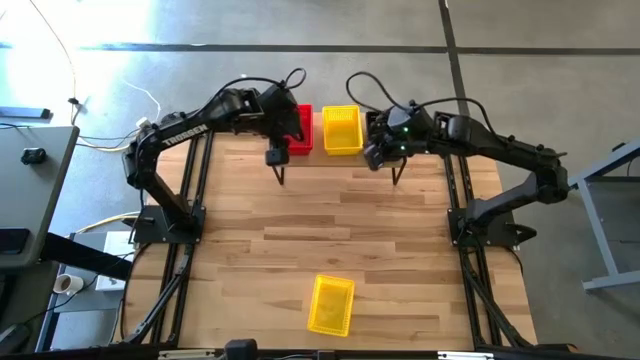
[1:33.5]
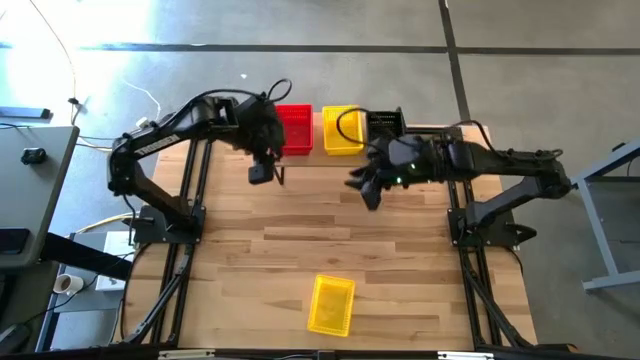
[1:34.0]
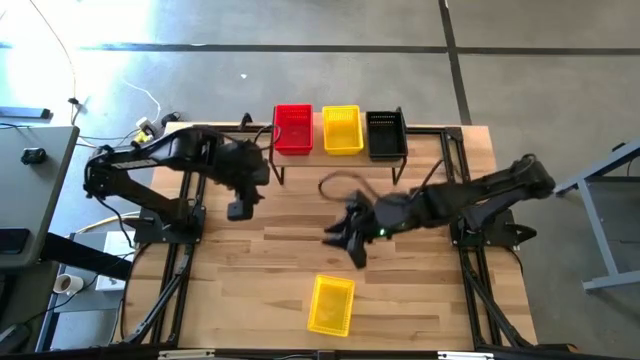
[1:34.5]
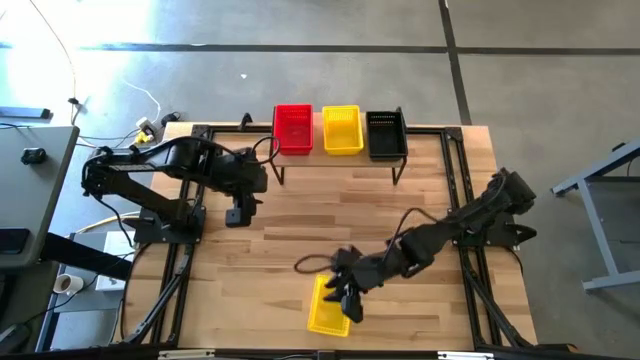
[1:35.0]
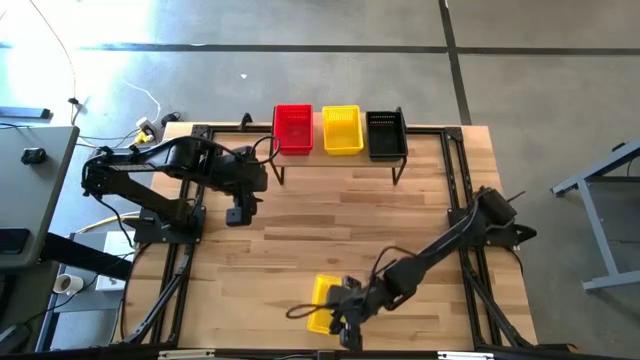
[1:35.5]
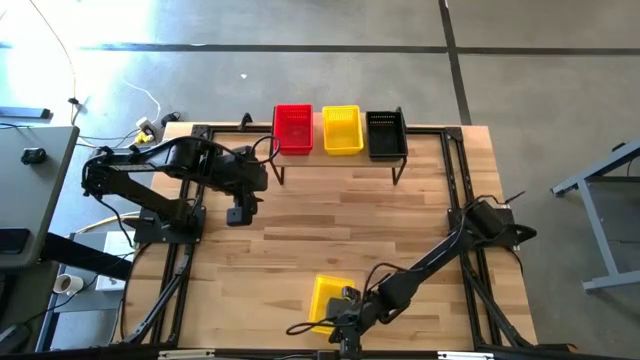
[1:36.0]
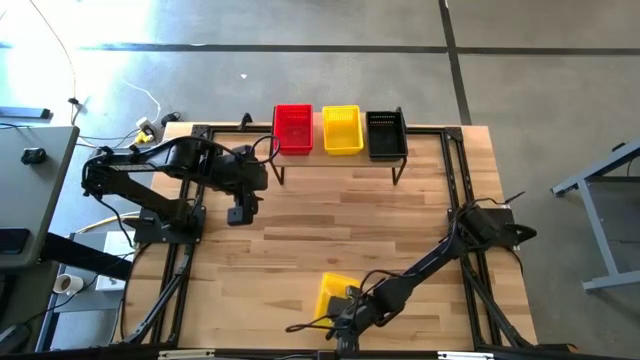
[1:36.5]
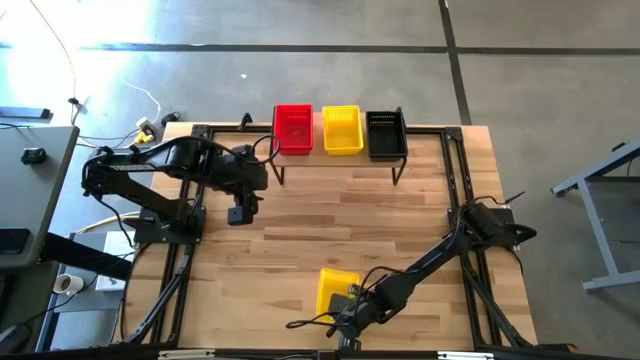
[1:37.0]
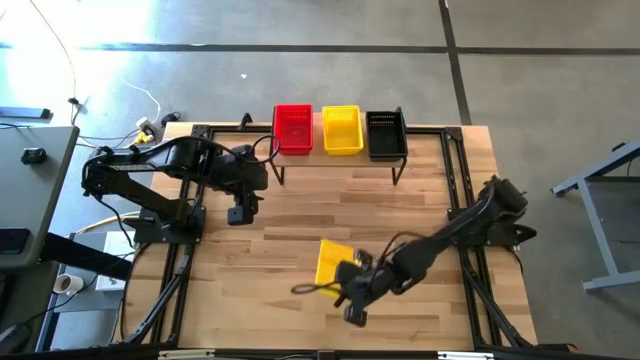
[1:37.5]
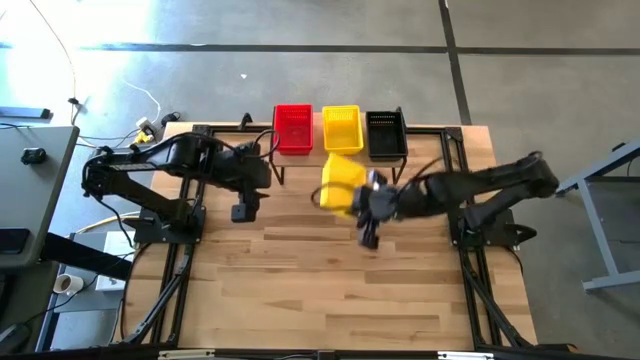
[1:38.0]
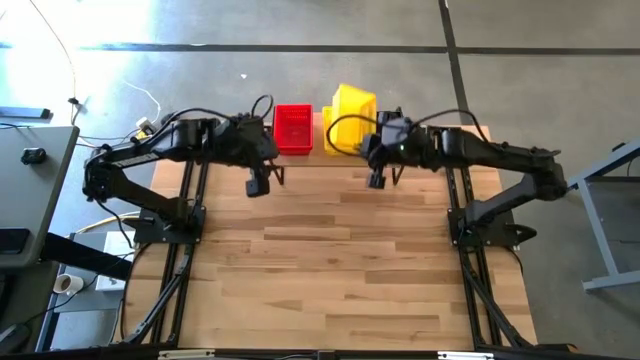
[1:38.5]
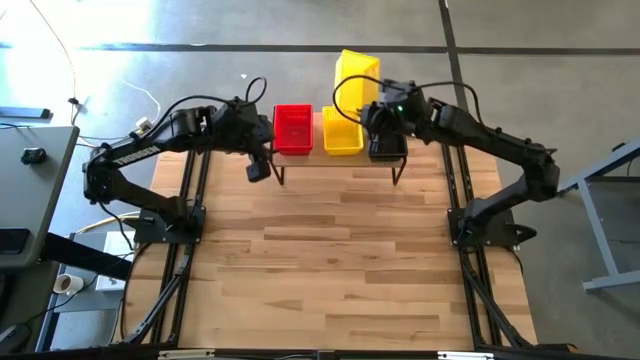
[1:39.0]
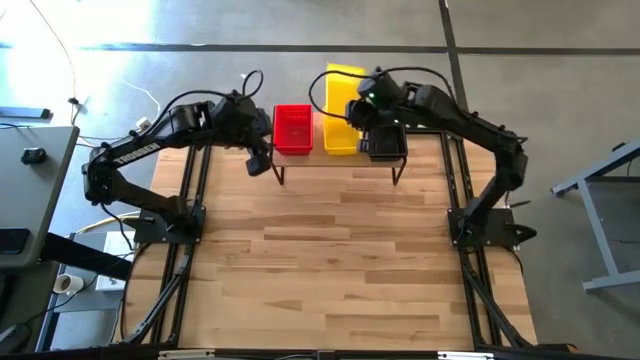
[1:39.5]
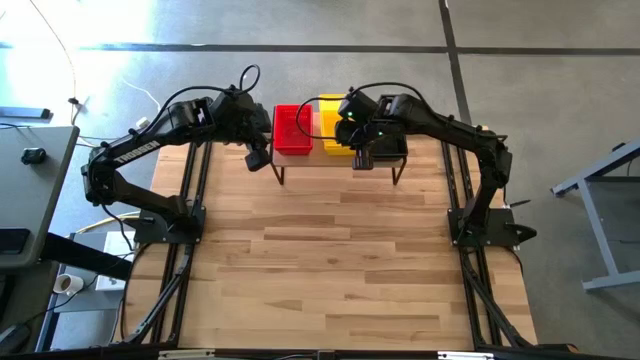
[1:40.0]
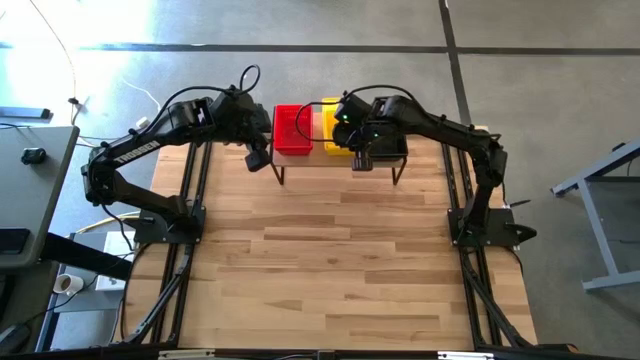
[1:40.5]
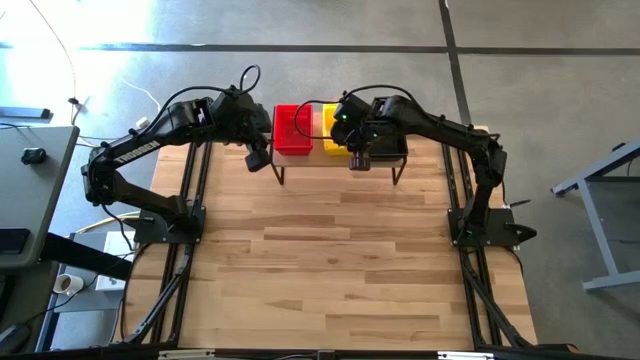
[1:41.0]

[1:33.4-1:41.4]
Task: Stack baskets on shelf by color
Stack the yellow bin on top of the other yellow bins on the shelf

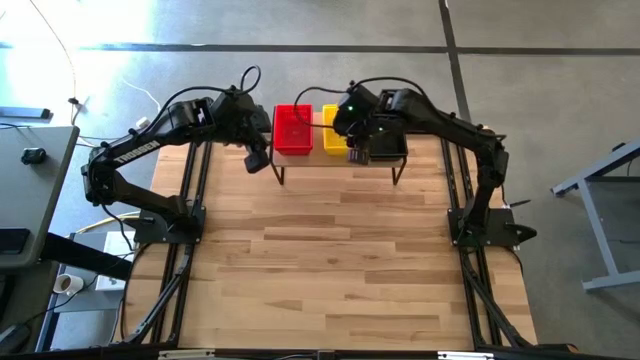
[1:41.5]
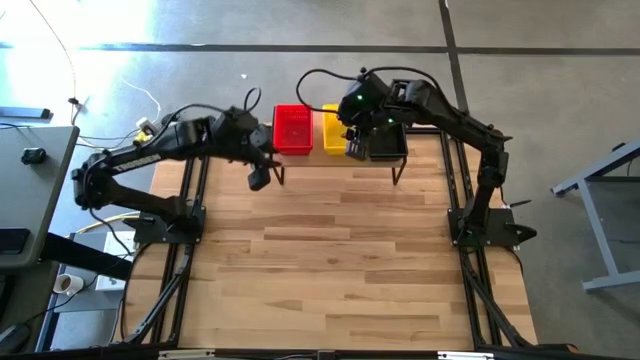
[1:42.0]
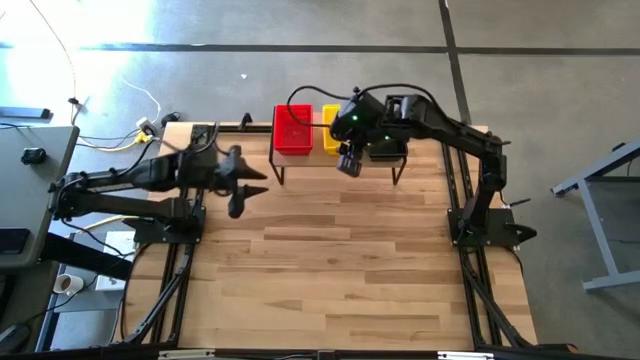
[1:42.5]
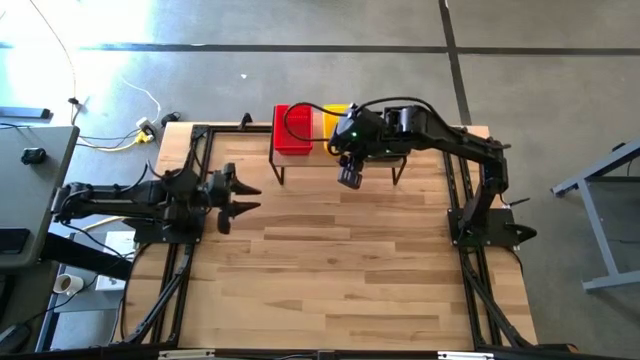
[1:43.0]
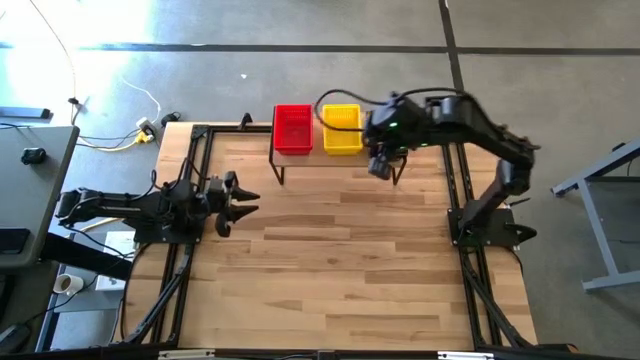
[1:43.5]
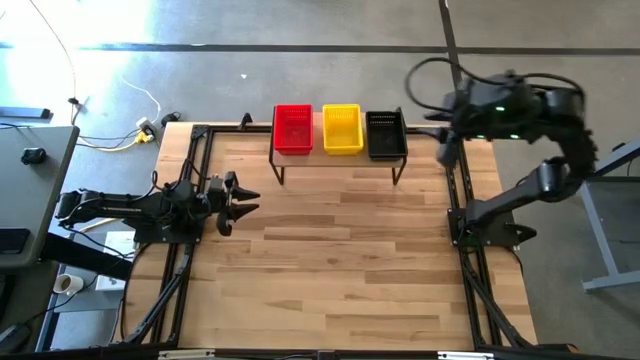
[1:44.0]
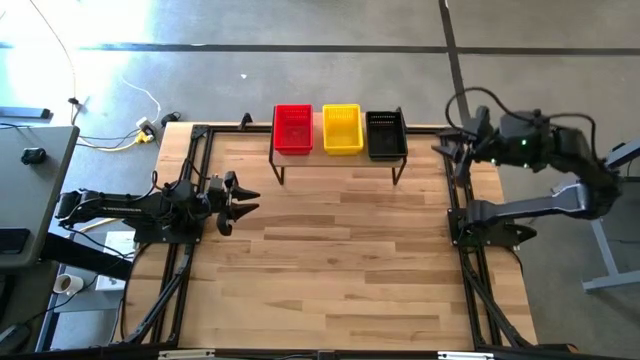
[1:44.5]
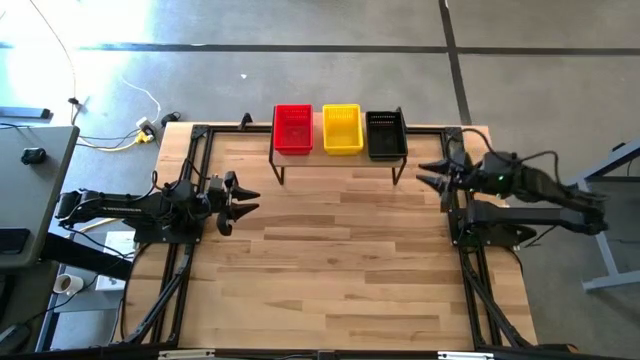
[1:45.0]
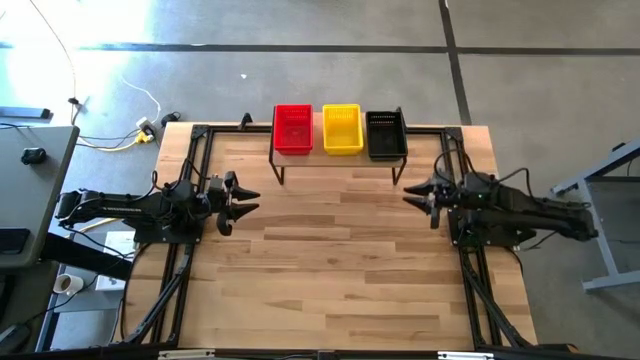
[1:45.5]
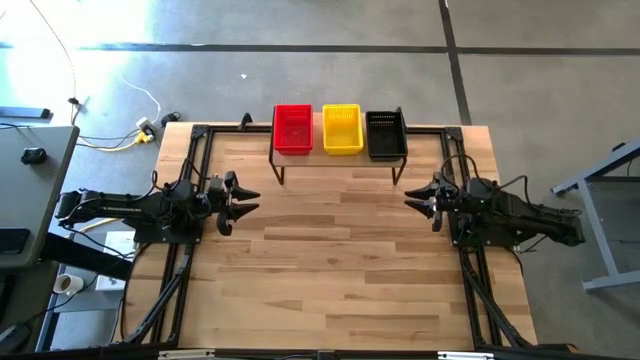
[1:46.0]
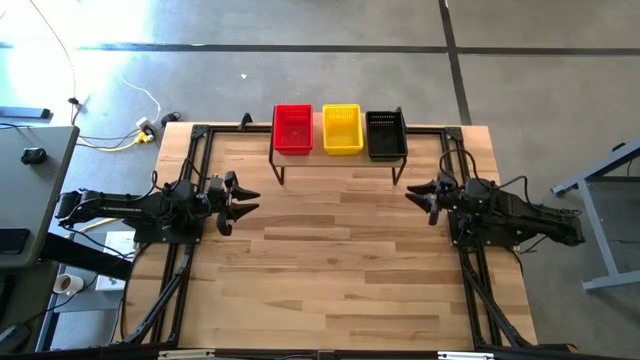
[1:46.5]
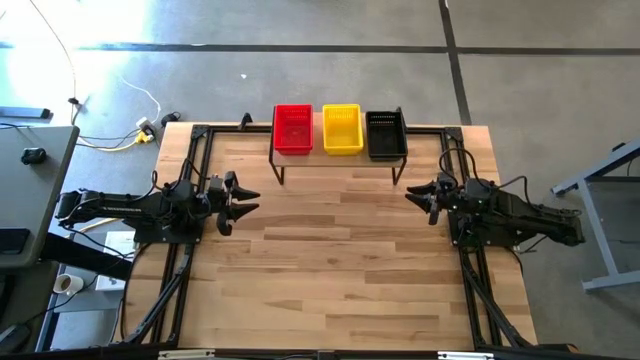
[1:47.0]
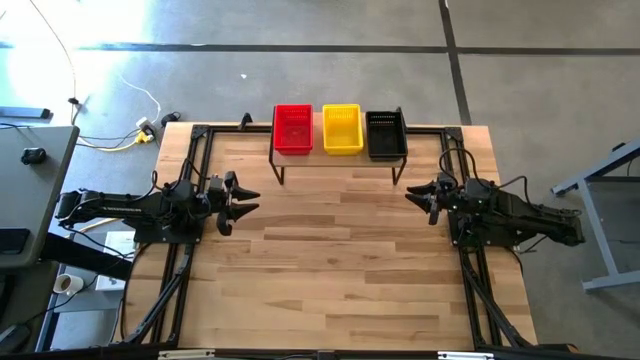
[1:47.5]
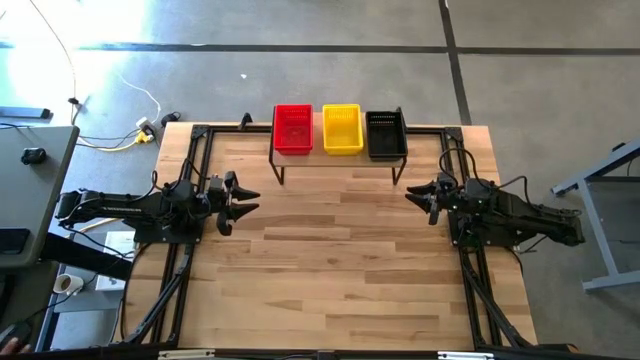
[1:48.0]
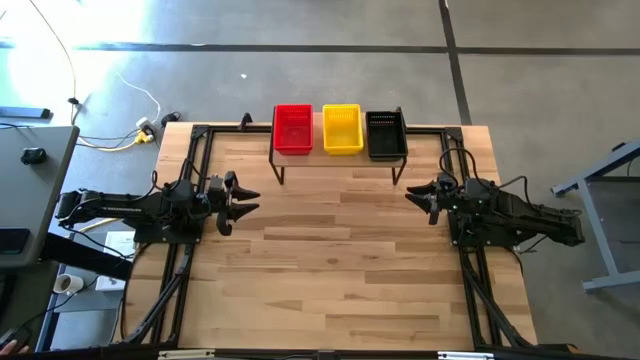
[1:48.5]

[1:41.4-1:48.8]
Return to Home Position

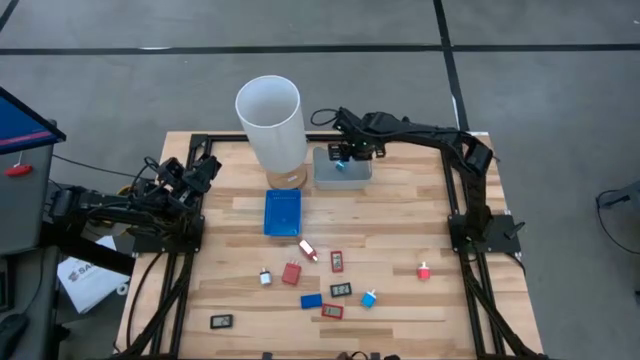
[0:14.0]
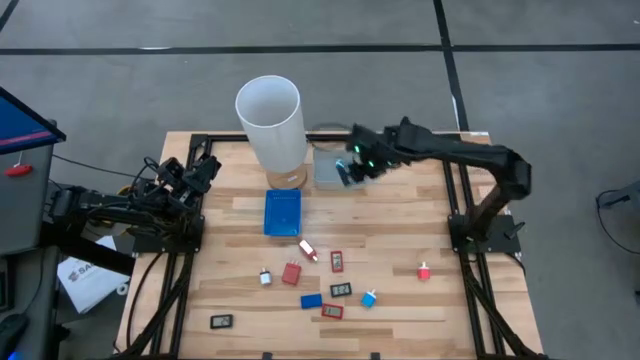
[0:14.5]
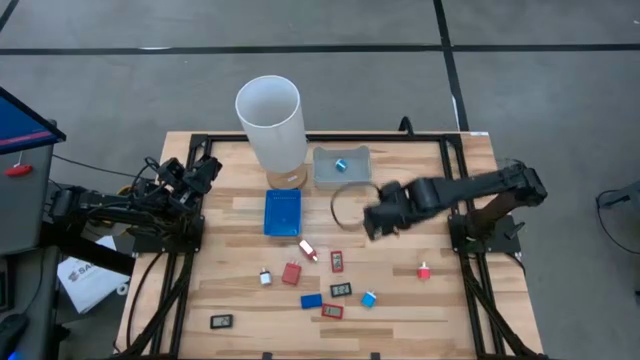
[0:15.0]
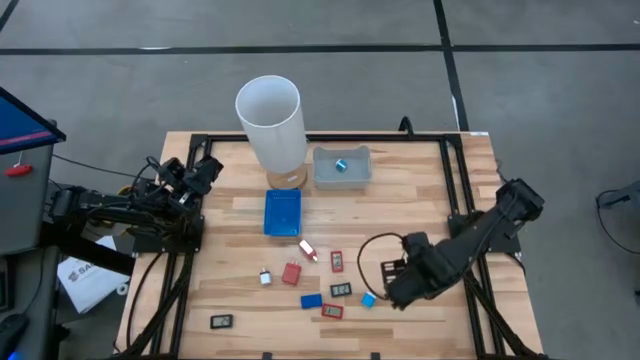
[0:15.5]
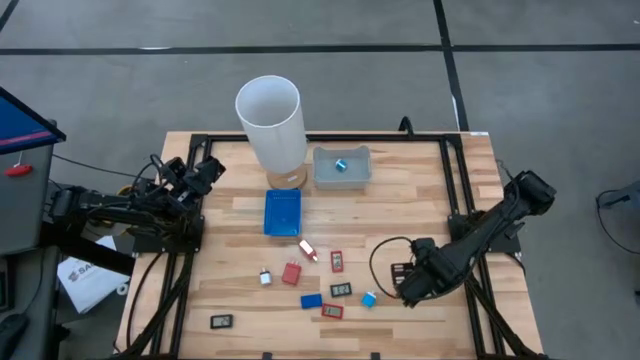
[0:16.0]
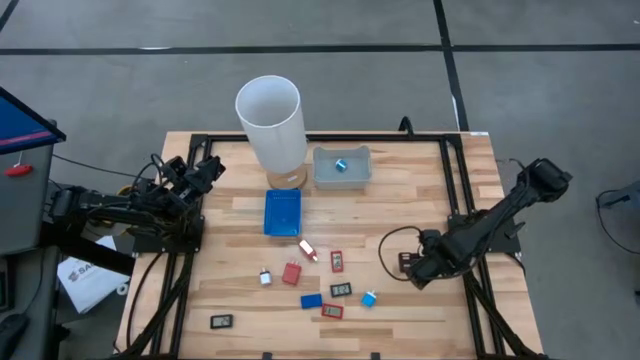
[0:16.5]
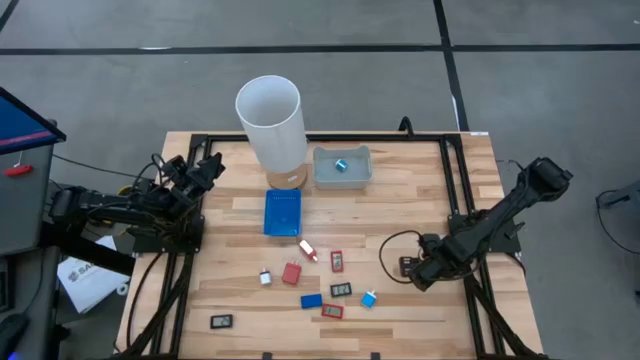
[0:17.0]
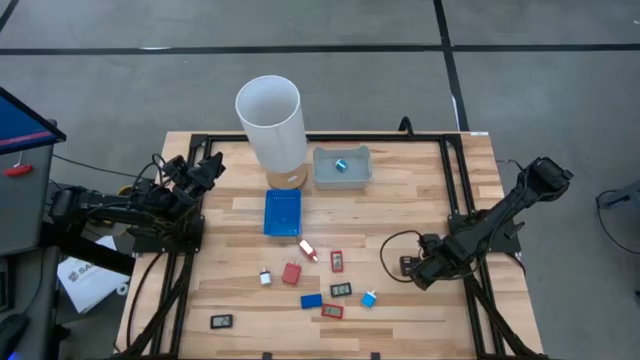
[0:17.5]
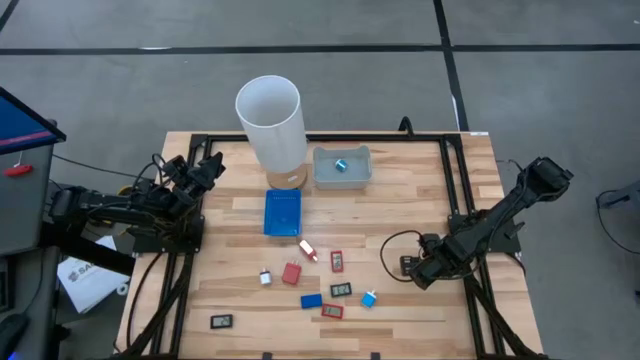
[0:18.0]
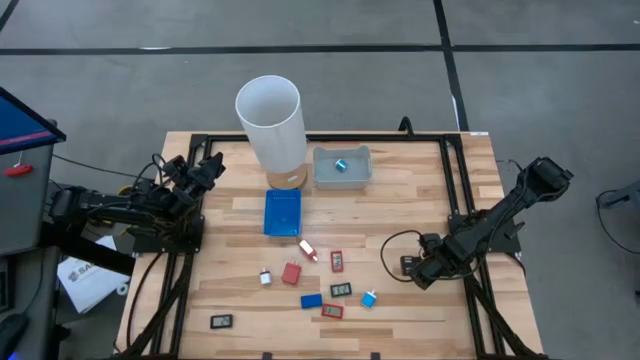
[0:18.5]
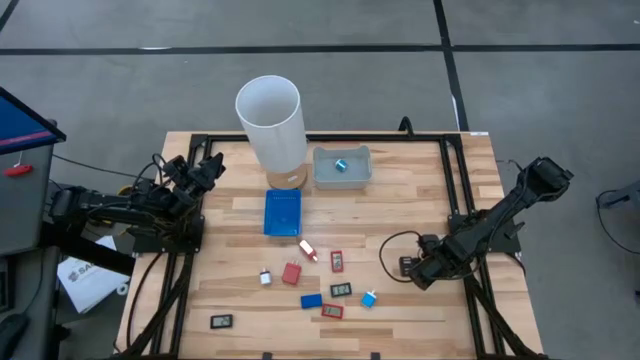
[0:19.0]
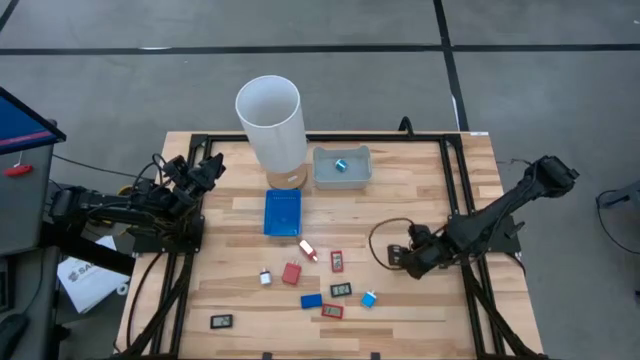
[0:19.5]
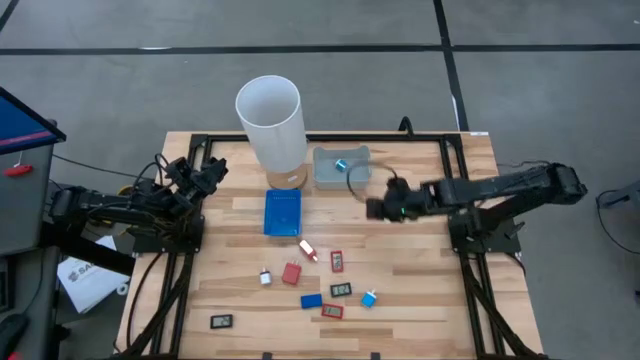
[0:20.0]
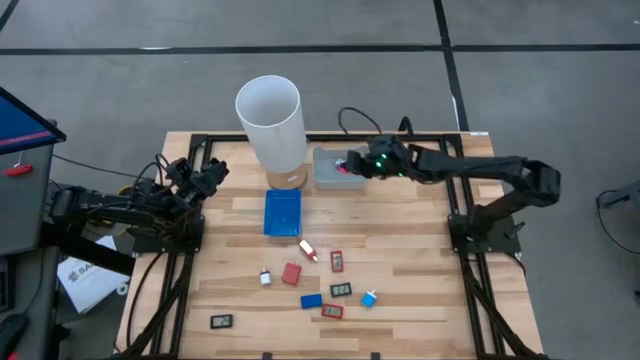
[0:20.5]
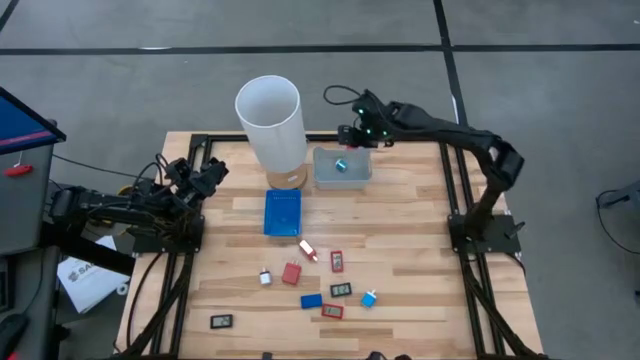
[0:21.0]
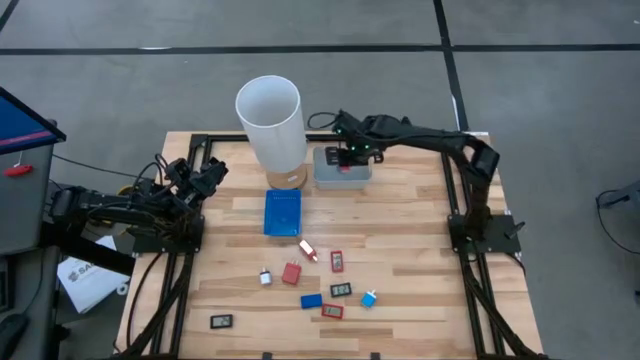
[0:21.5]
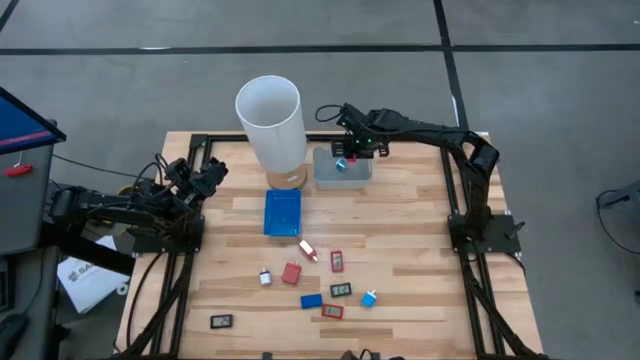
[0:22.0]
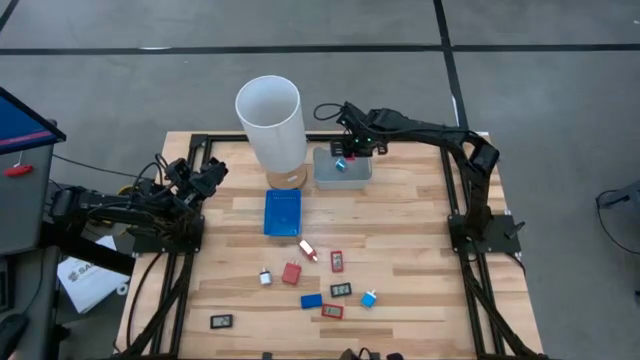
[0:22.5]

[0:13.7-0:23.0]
Task: Pick & Place Office items
Put the pink charger adapter into the gray bin
